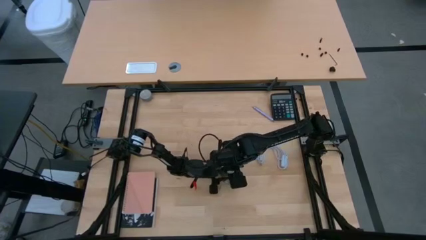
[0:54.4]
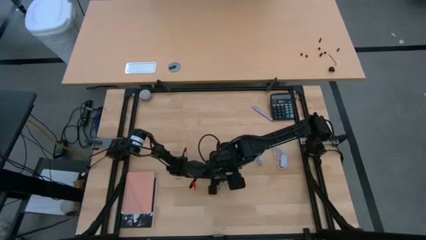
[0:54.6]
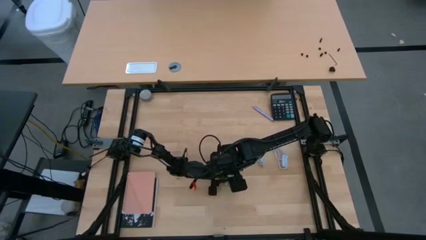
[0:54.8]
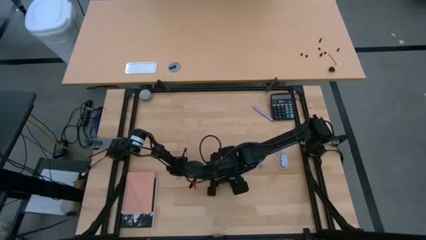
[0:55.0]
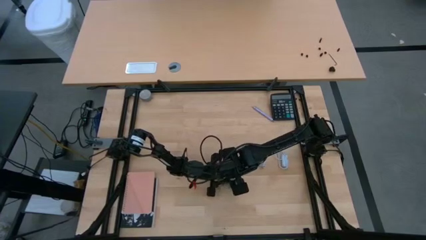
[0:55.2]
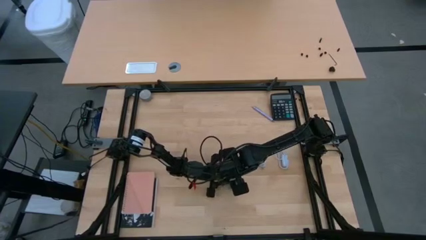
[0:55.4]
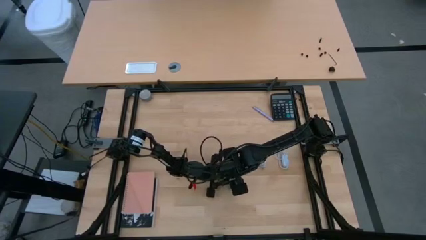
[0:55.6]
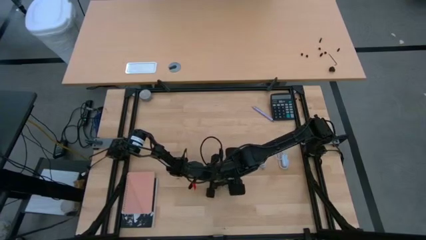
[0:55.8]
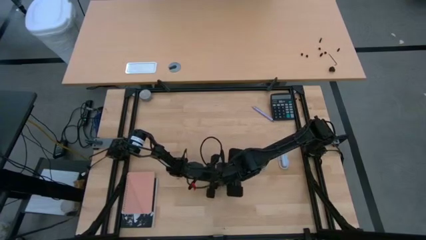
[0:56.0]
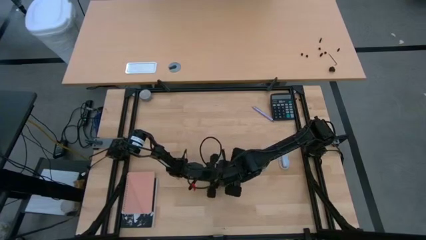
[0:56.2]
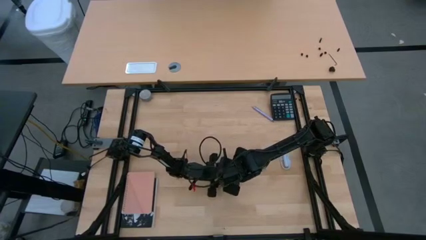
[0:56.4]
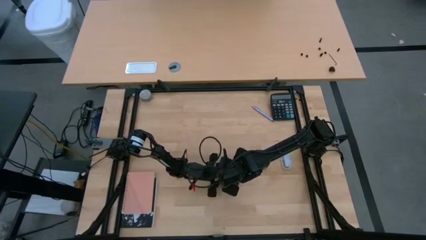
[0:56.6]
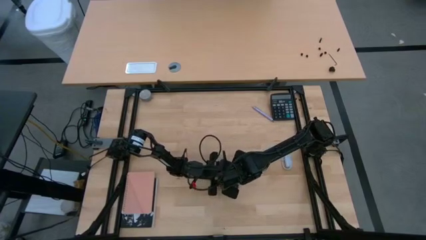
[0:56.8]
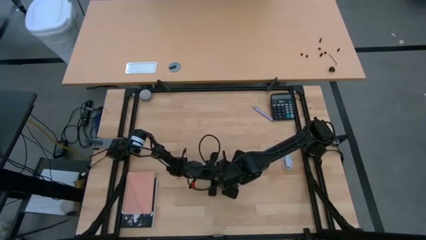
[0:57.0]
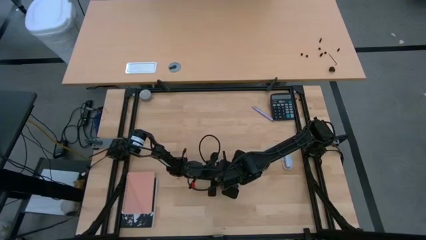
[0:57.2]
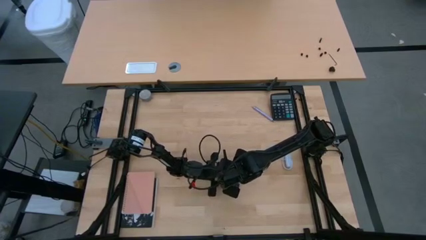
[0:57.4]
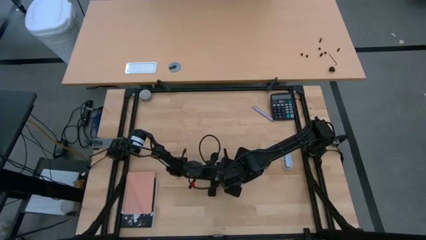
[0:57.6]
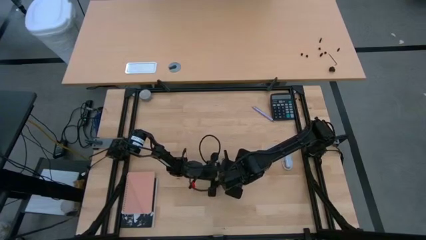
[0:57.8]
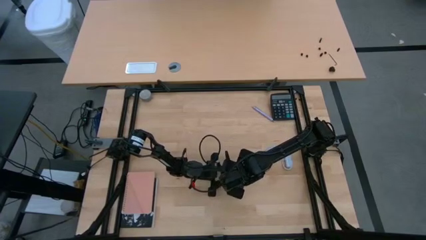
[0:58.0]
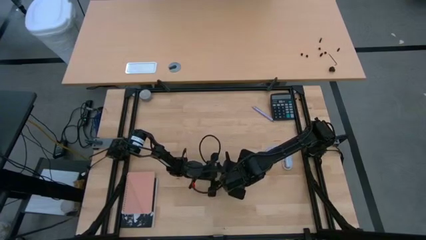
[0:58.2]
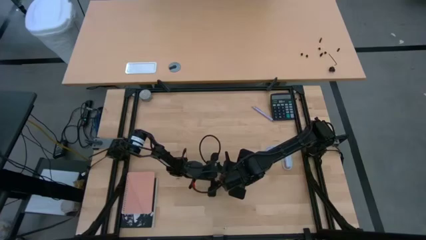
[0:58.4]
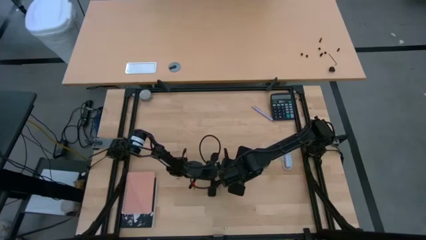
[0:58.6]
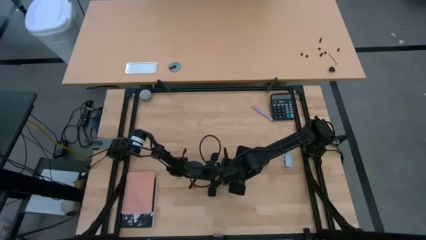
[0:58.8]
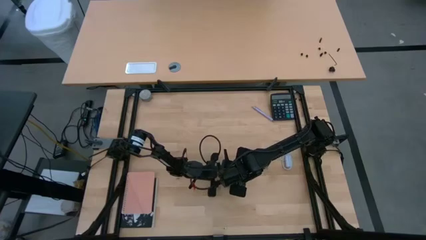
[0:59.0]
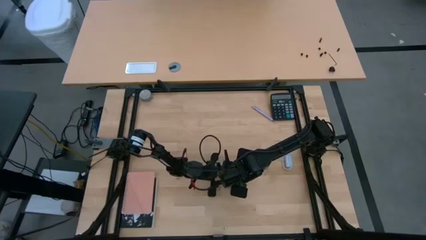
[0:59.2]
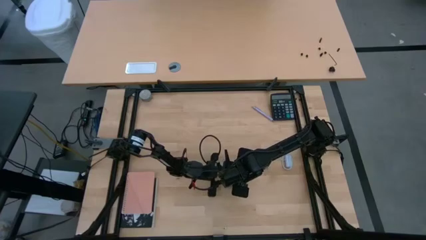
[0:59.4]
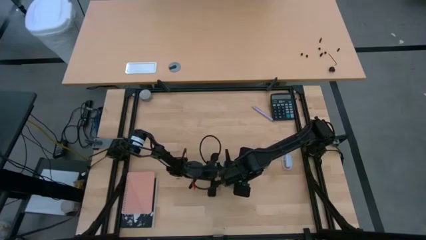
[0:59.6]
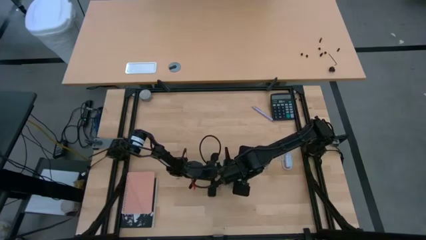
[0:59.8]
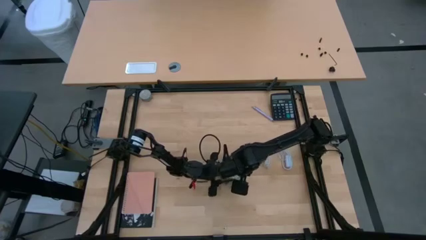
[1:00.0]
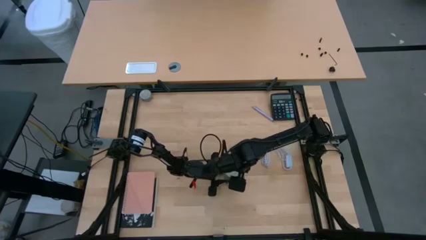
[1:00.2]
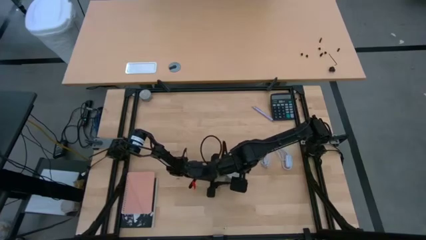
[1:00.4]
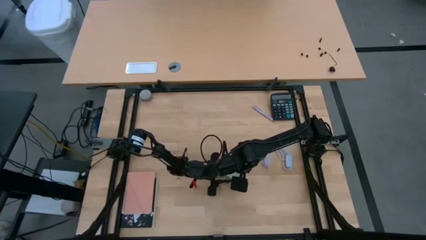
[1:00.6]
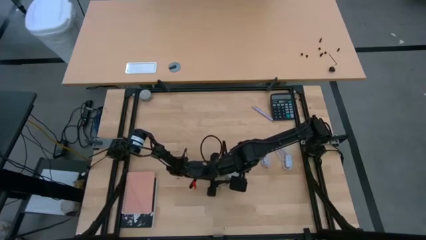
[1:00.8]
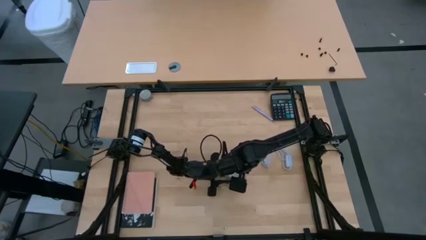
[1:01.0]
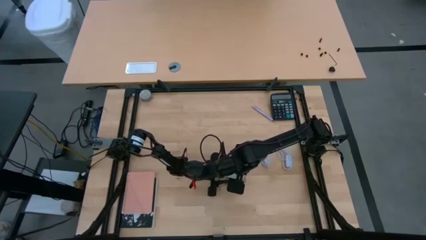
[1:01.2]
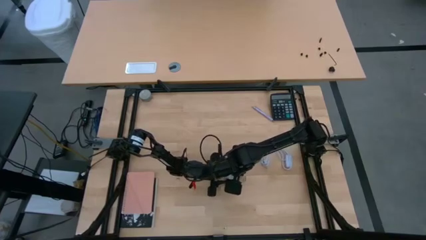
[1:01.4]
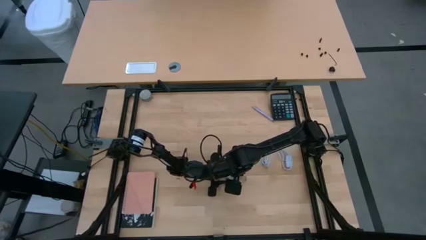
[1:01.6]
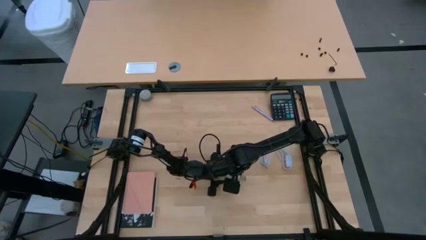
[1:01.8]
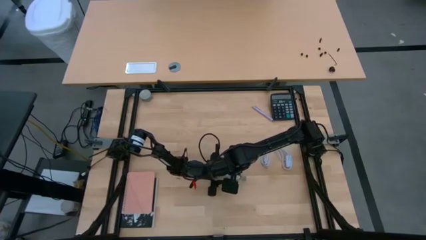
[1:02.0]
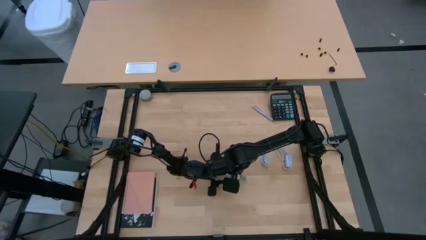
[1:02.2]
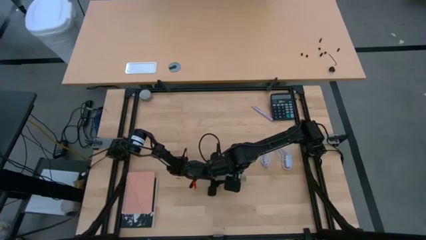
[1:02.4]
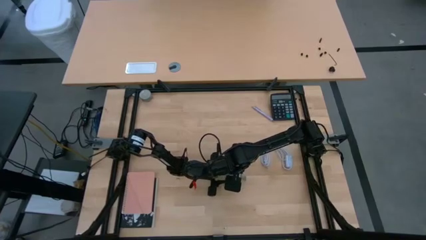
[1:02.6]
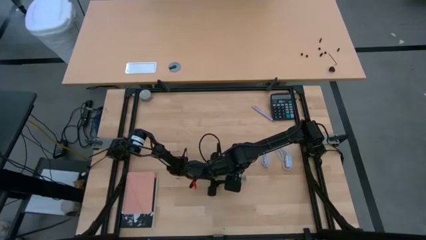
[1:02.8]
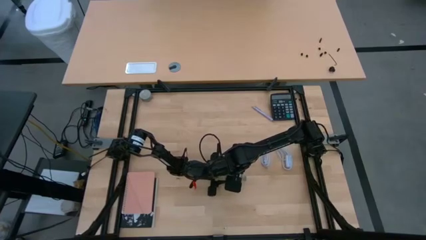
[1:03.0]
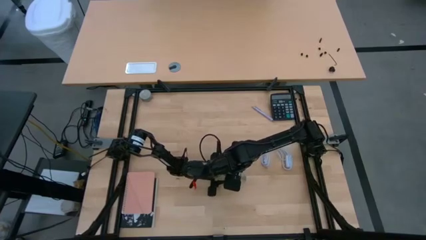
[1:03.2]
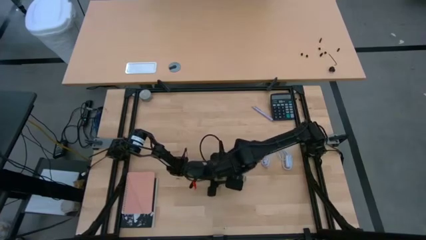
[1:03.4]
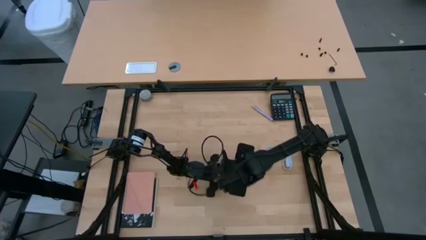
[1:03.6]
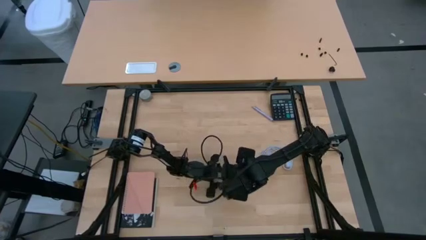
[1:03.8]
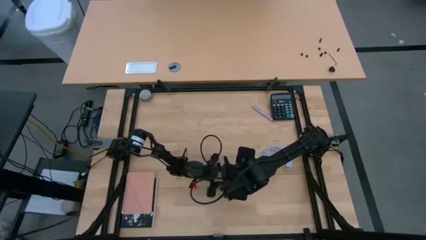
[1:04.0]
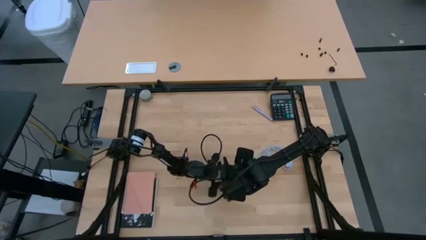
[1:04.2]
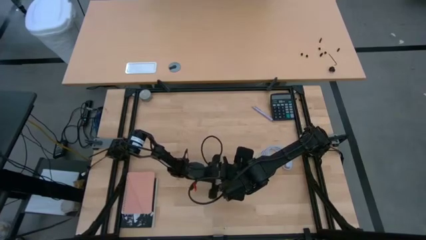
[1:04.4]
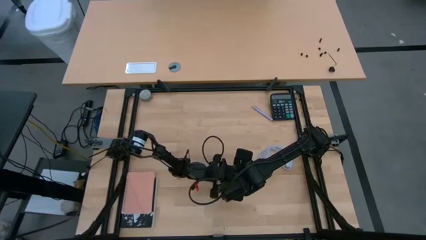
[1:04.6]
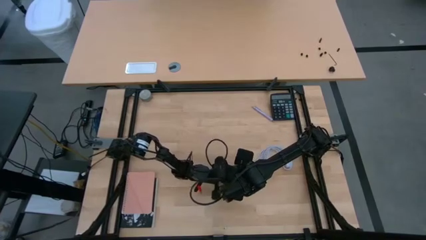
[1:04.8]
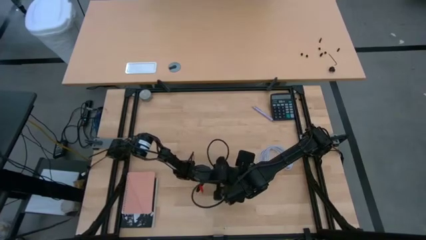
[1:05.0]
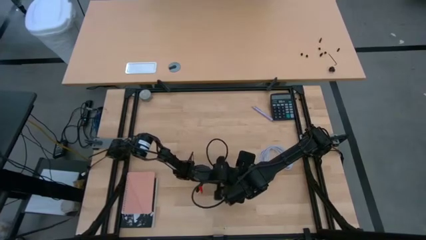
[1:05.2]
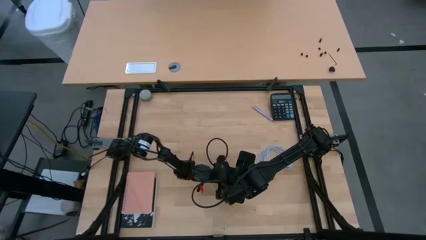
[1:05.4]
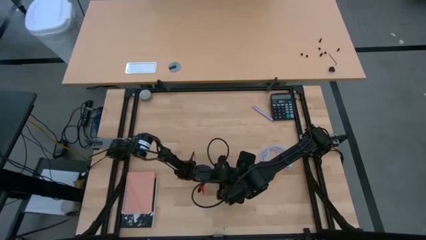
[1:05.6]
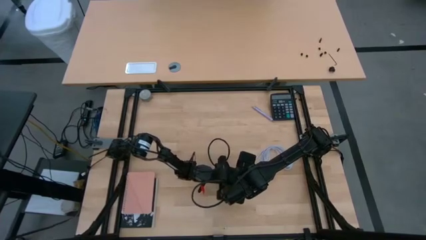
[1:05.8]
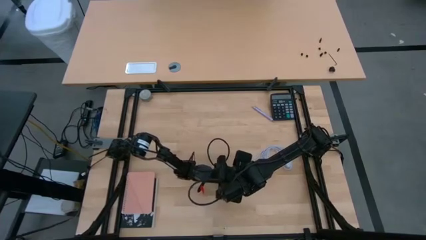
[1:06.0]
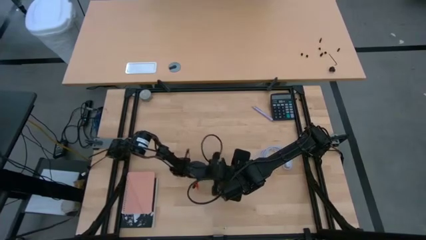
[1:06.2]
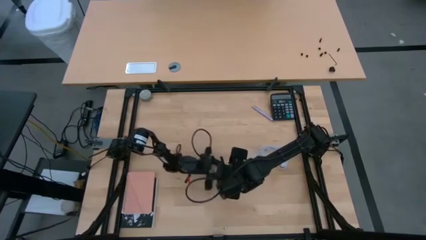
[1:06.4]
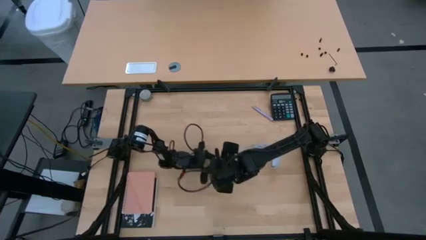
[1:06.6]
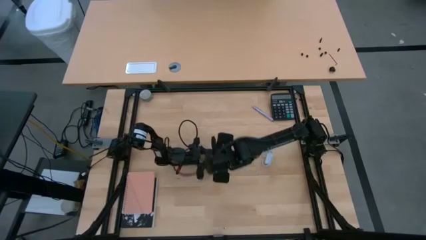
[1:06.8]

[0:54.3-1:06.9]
Task: Screw lightbulb
Insert the lightbulb on the lamp
